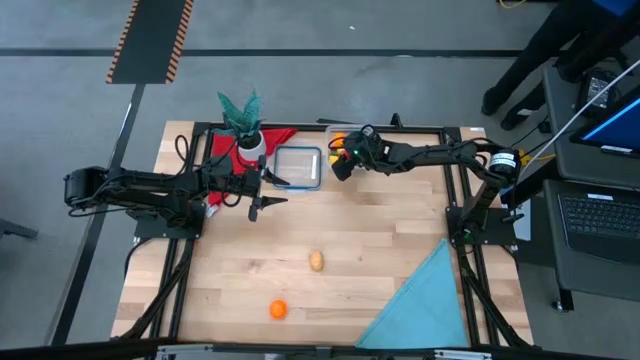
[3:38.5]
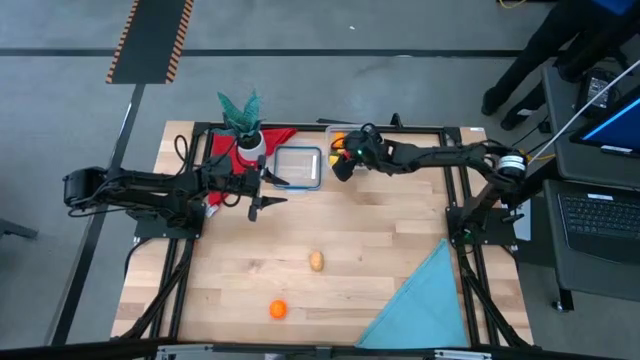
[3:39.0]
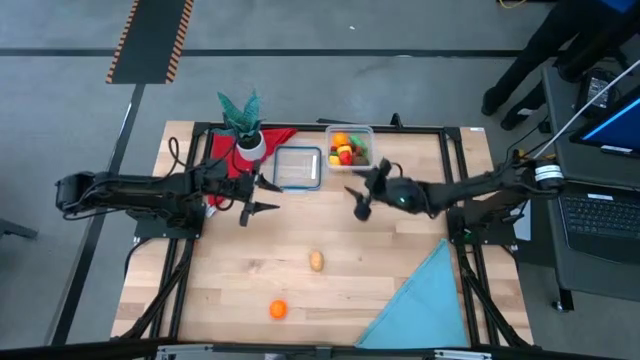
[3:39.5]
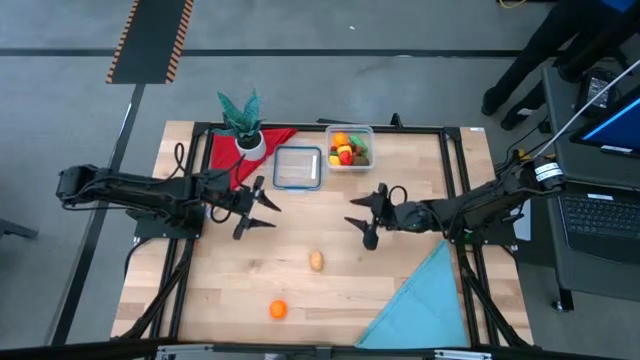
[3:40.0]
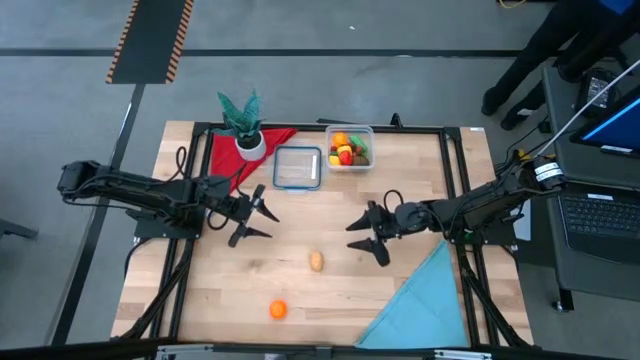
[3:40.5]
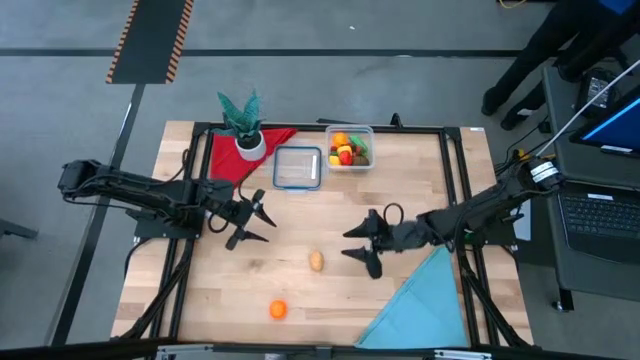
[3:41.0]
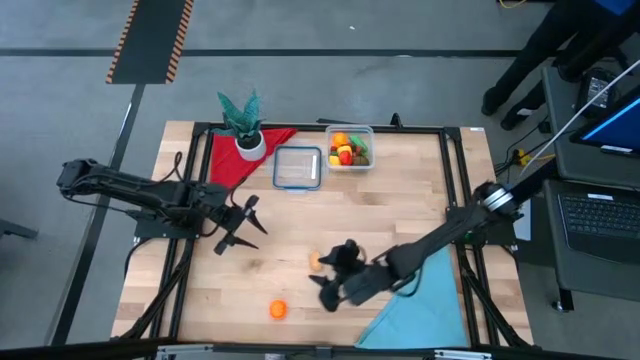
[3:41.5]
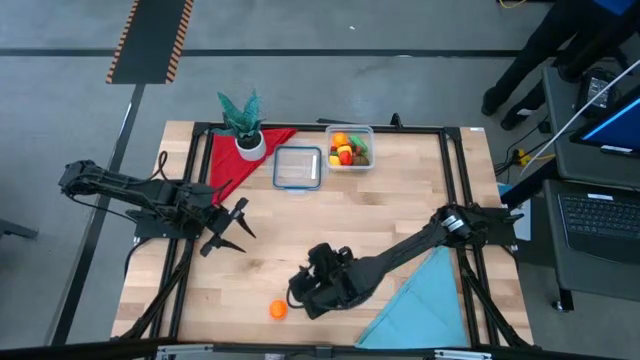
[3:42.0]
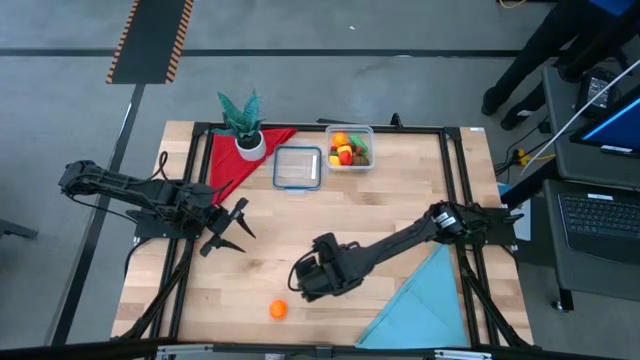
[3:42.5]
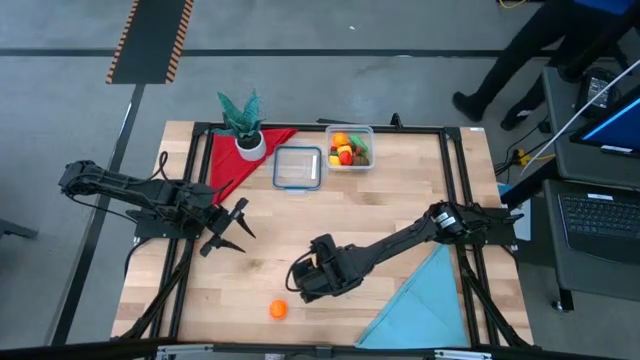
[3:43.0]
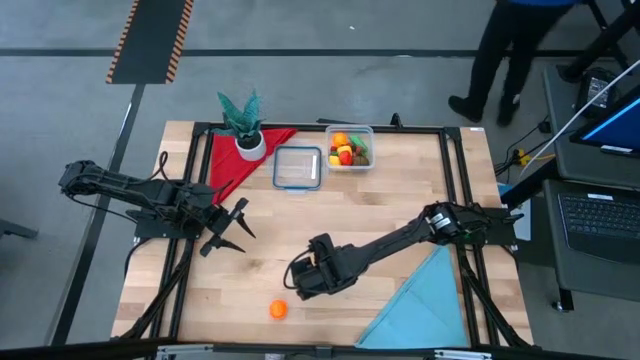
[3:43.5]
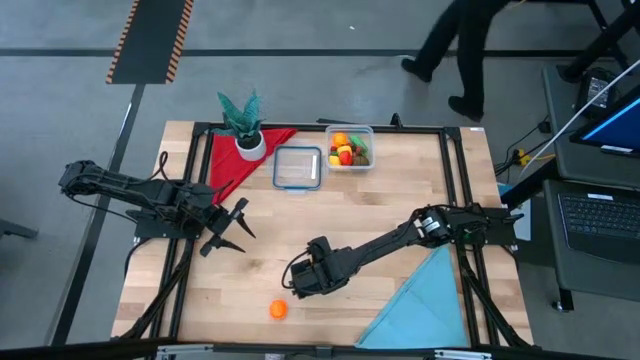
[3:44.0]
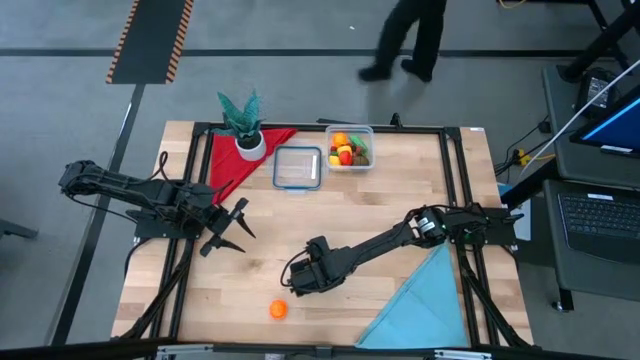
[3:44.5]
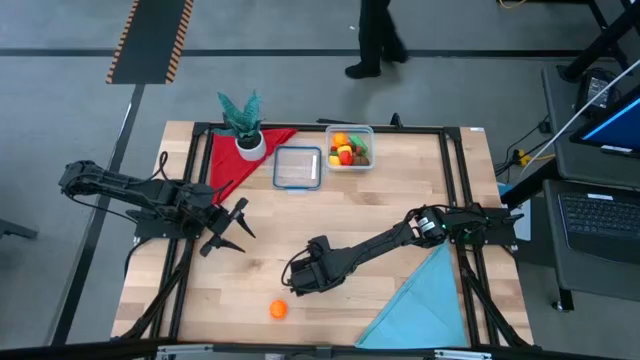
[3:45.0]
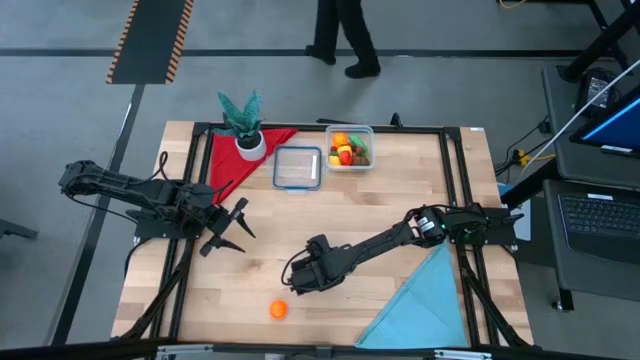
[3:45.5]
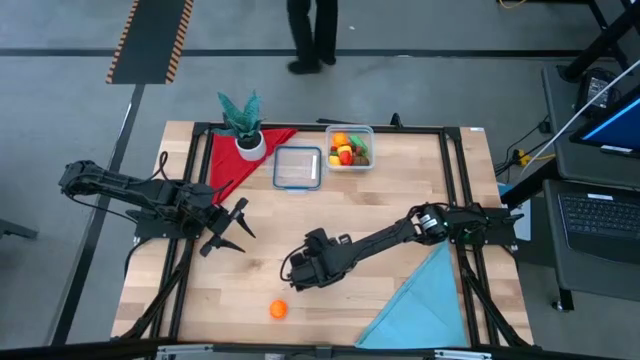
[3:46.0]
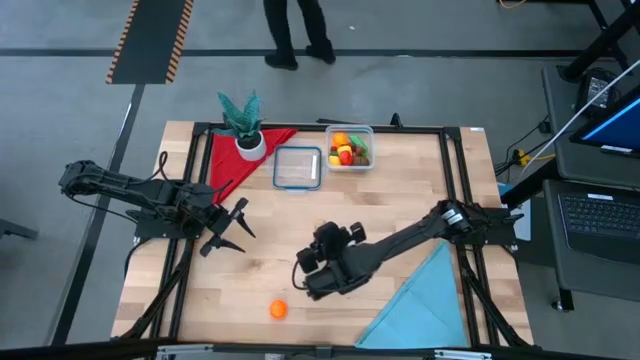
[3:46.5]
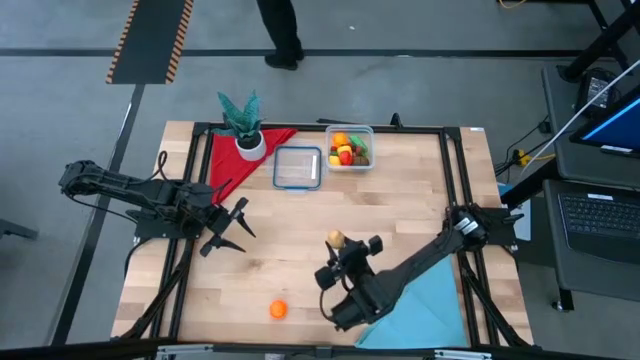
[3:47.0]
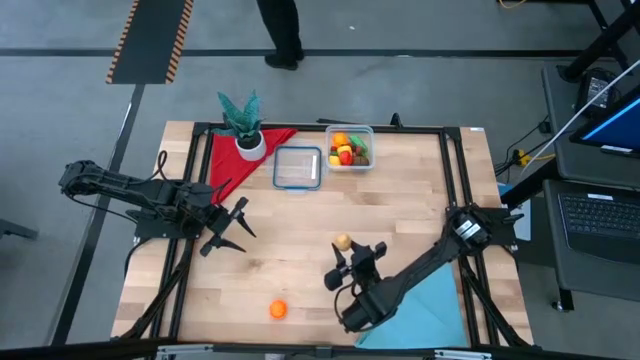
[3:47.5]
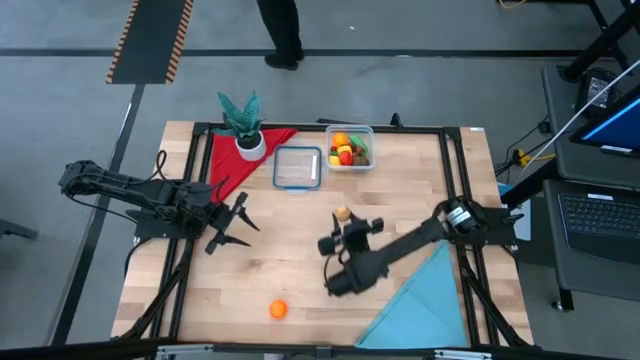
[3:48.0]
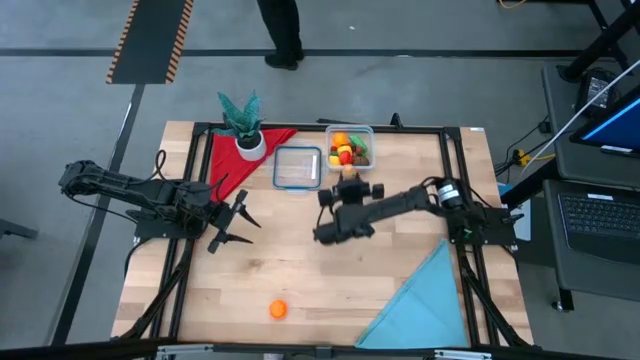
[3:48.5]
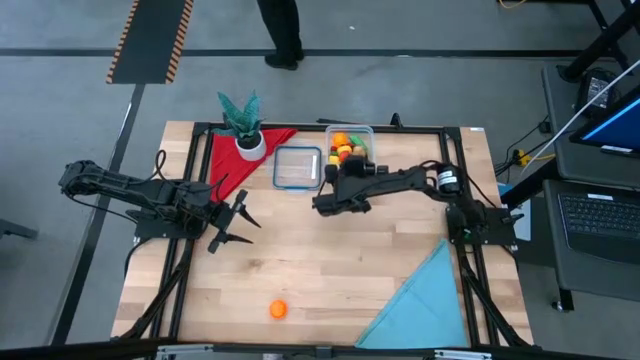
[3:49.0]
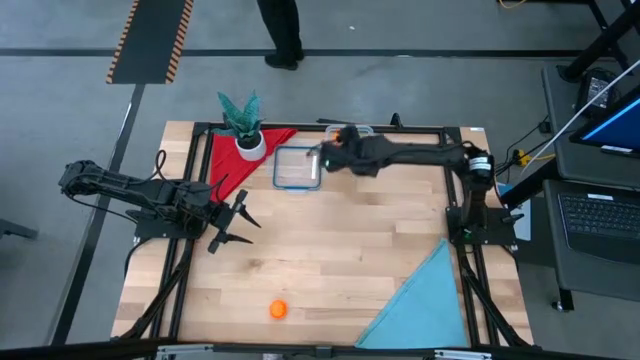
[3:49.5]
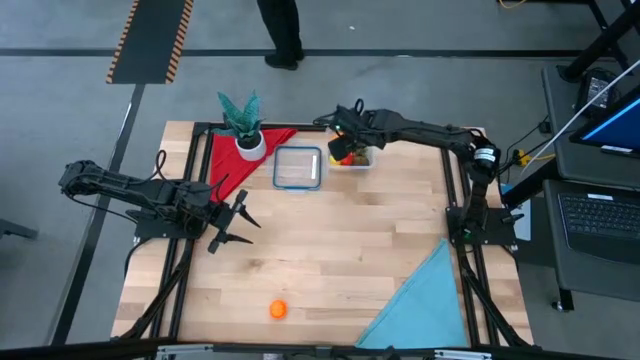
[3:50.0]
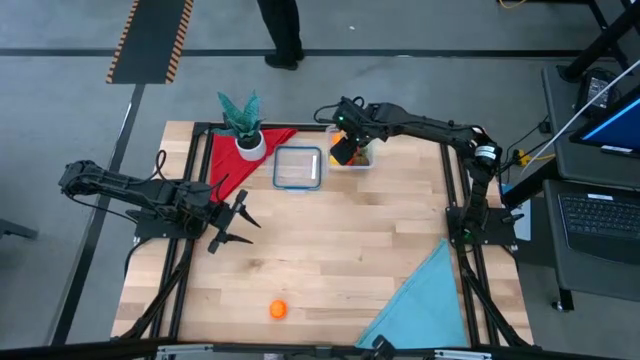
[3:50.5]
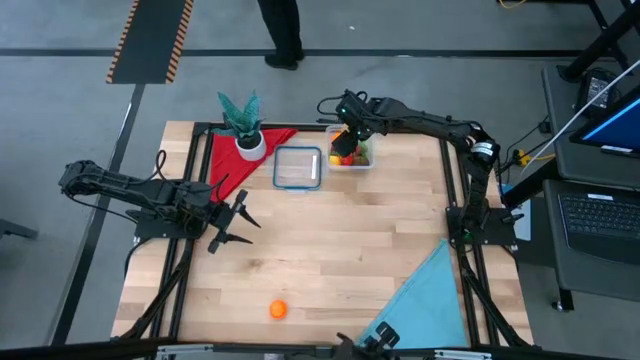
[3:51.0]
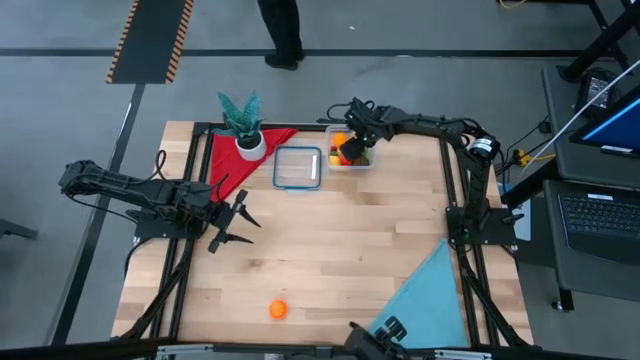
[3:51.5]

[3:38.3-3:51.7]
Task: Pick and placing Produce into tupperware
Put the potato into the transparent bin

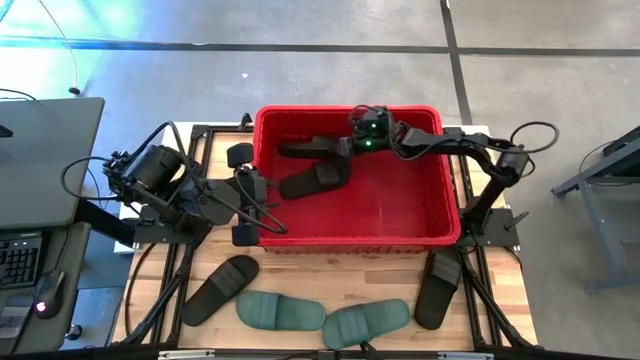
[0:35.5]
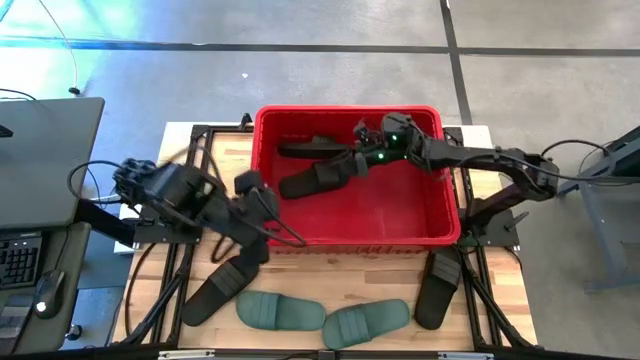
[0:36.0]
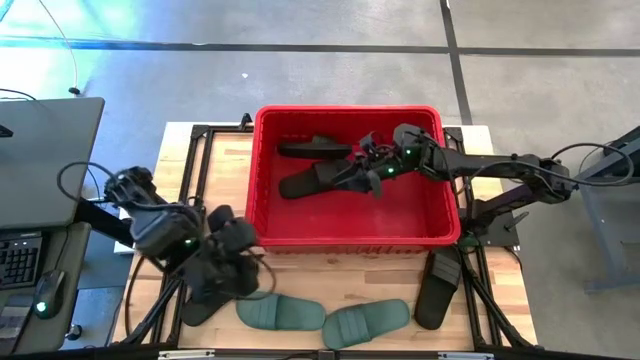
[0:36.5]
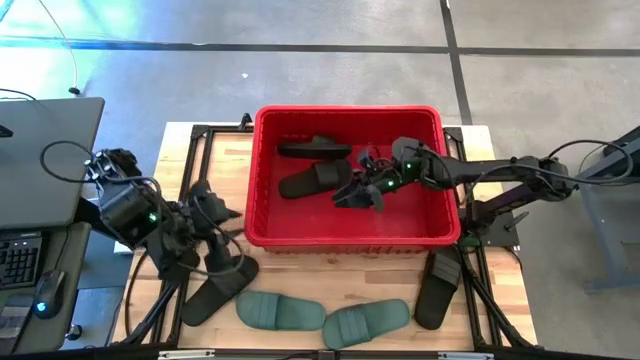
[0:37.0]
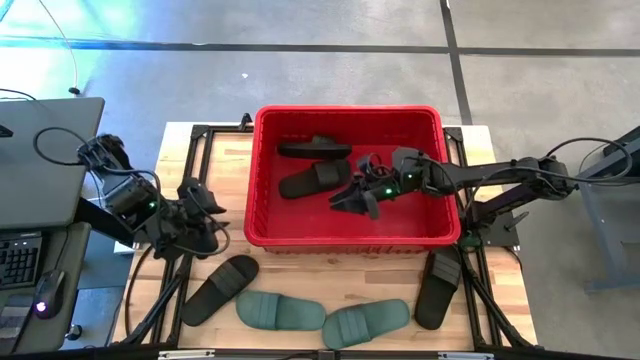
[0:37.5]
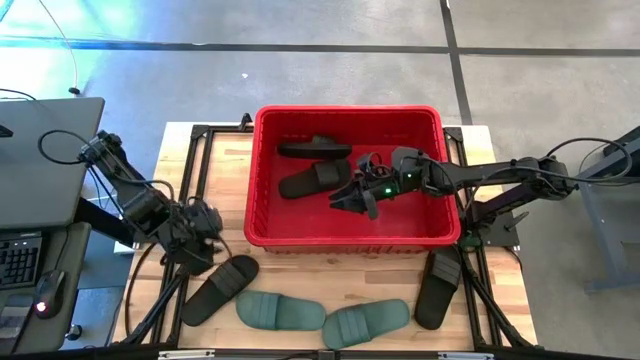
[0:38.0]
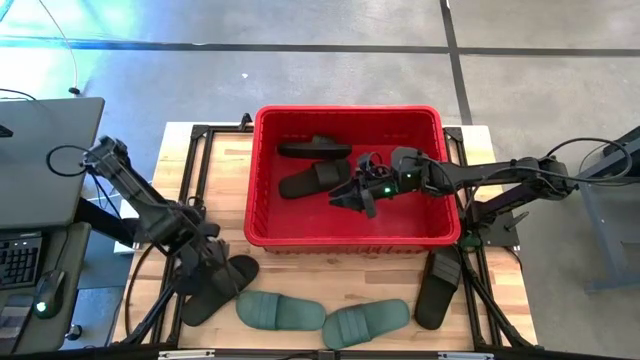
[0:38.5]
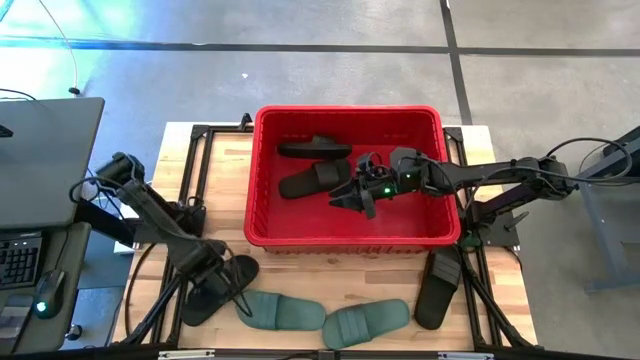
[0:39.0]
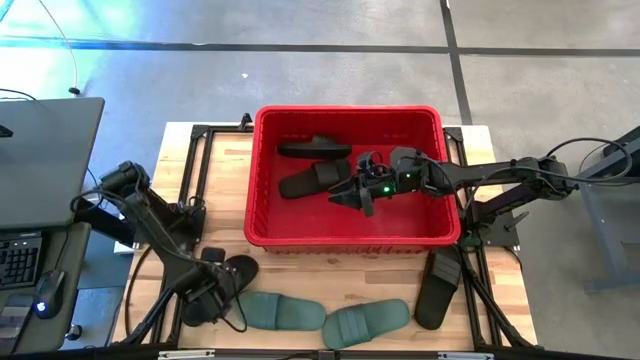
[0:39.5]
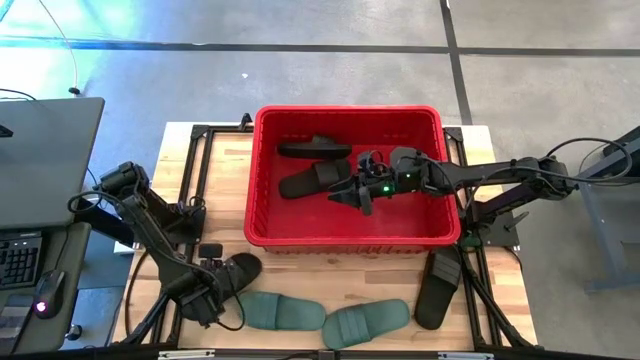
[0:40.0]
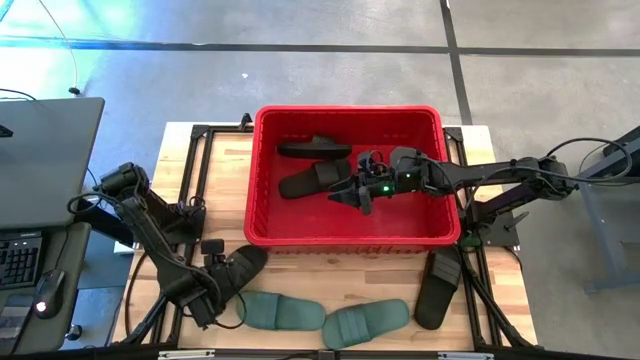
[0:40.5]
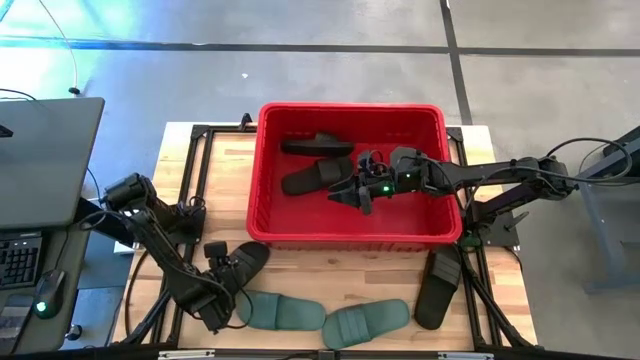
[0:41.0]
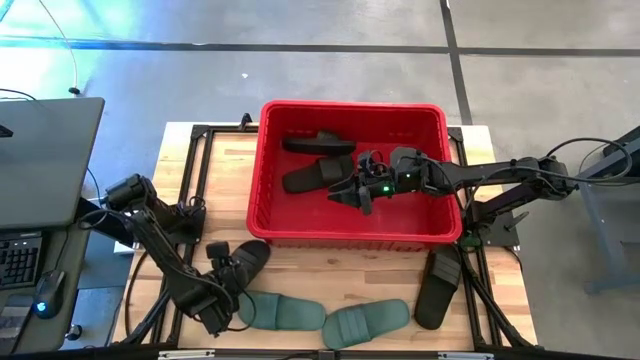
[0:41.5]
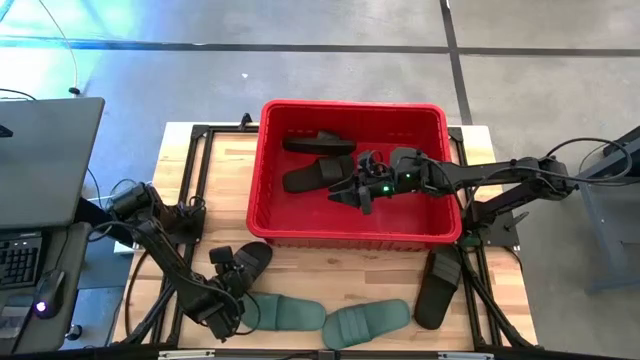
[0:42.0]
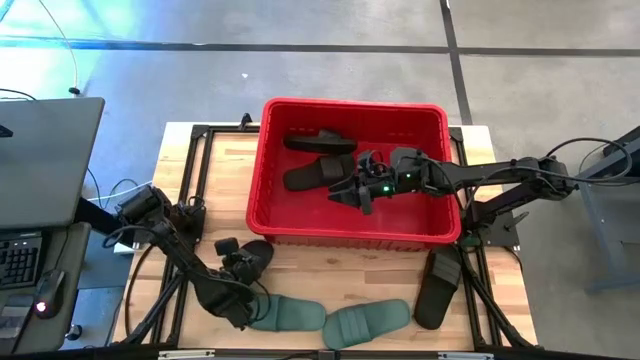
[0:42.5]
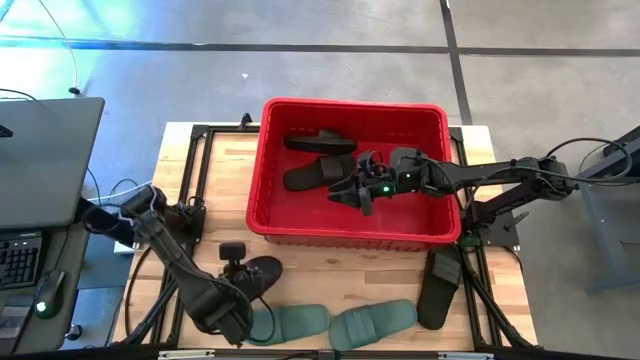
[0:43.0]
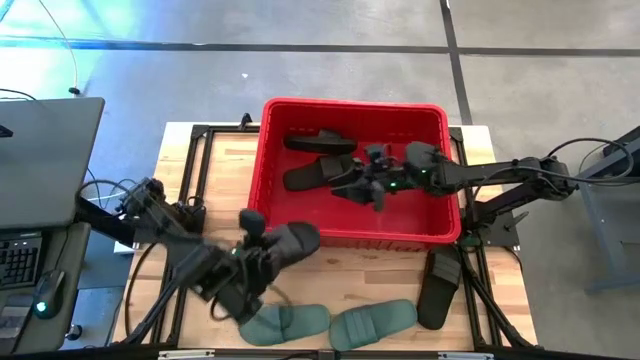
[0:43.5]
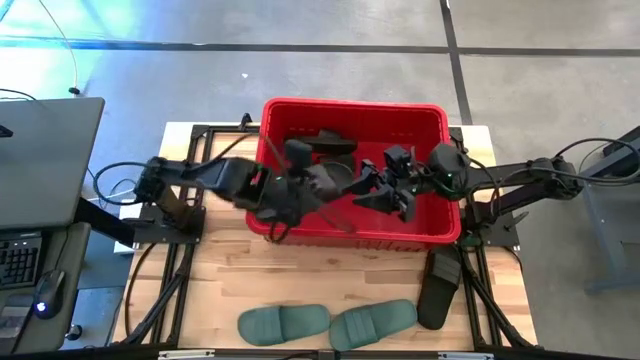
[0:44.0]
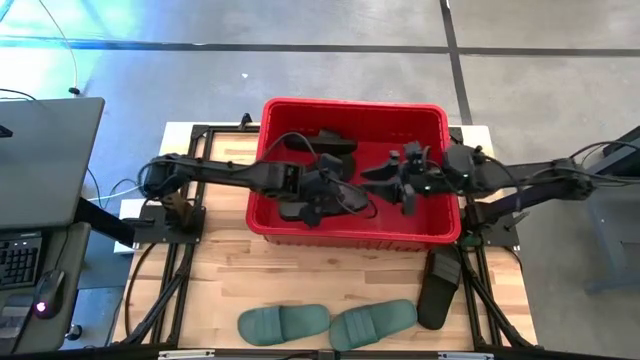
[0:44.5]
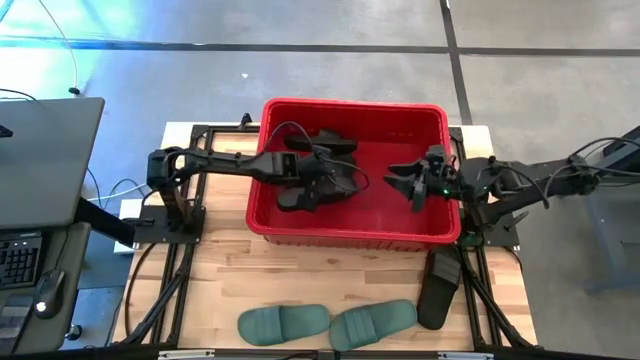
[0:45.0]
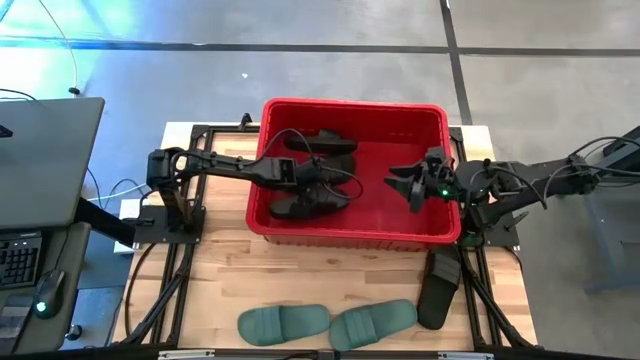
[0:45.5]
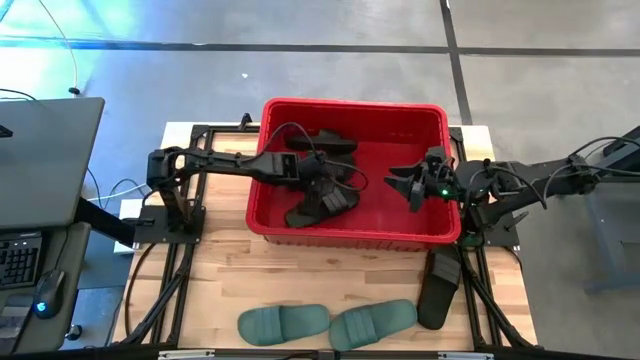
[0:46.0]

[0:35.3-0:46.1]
Task: Pick and place slides into bin
Put the black slide into the red bin
